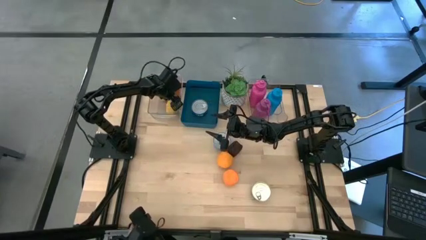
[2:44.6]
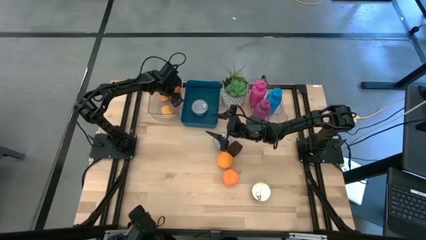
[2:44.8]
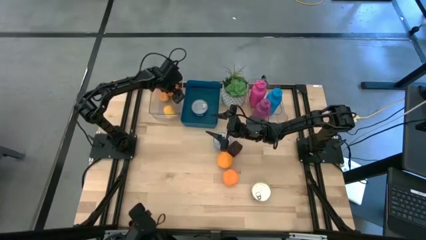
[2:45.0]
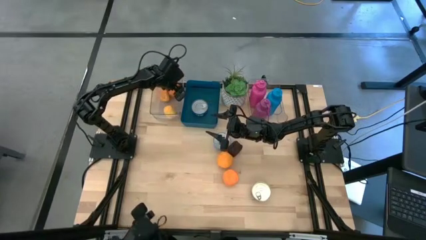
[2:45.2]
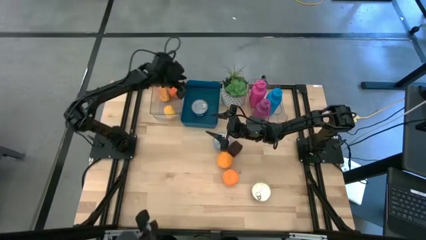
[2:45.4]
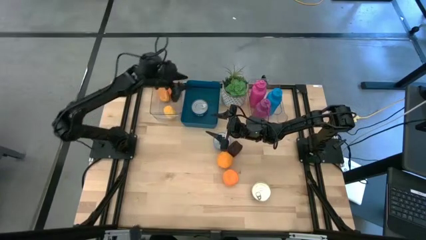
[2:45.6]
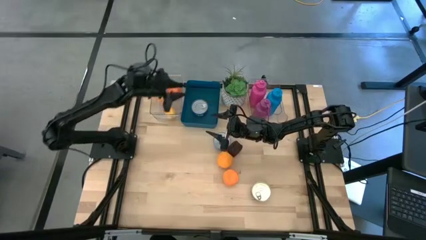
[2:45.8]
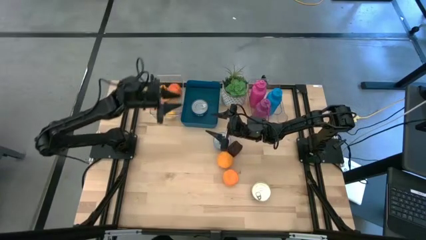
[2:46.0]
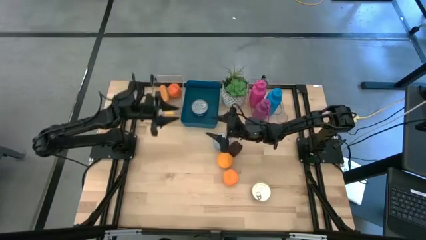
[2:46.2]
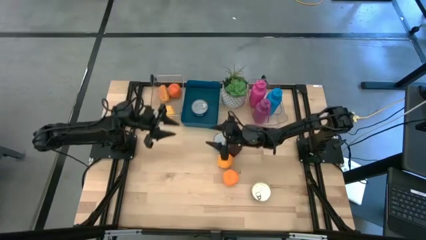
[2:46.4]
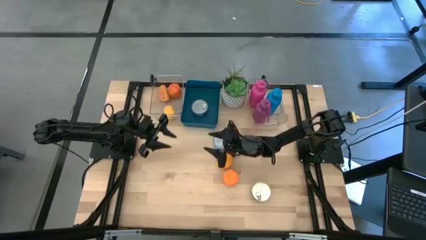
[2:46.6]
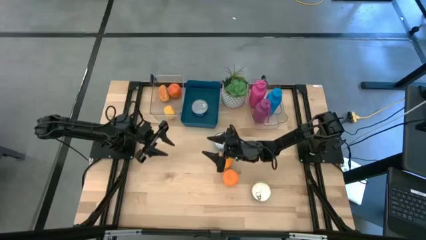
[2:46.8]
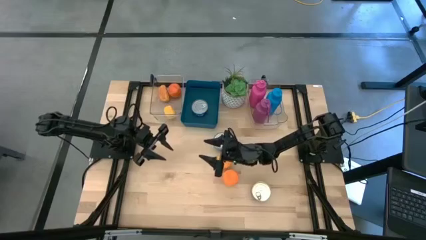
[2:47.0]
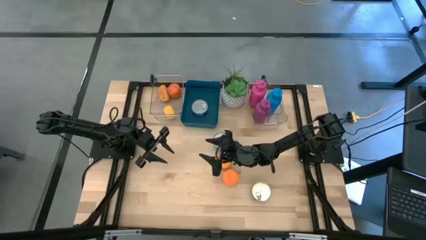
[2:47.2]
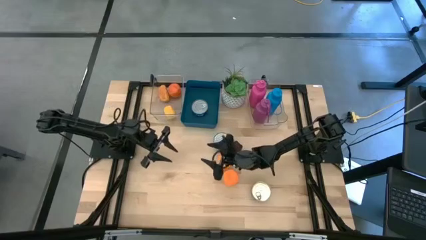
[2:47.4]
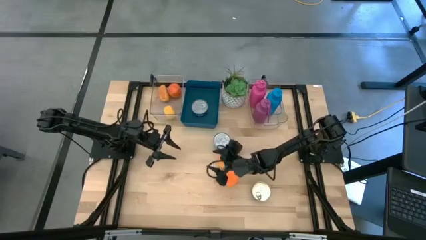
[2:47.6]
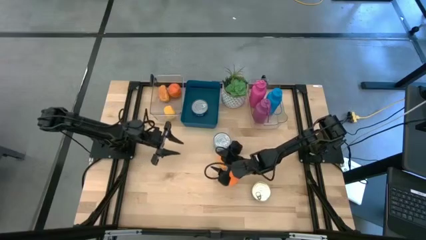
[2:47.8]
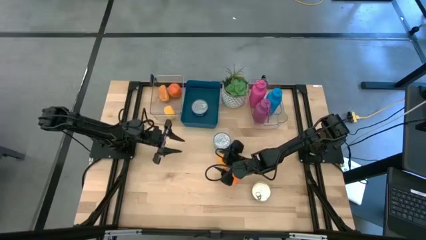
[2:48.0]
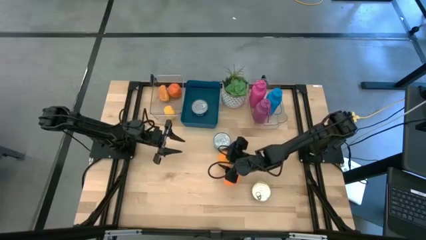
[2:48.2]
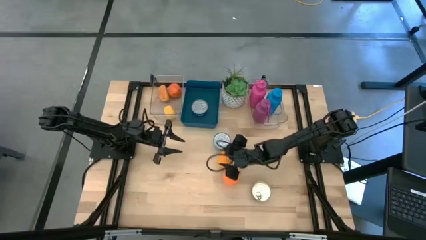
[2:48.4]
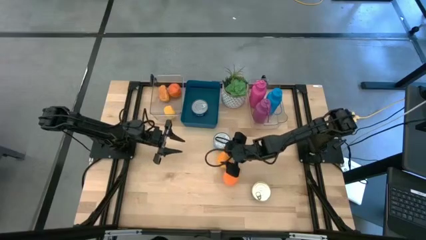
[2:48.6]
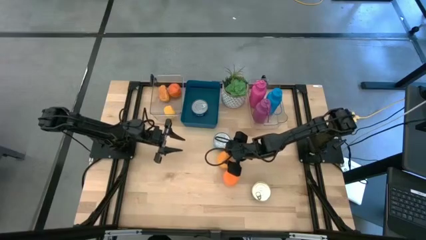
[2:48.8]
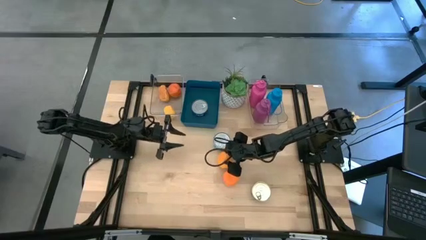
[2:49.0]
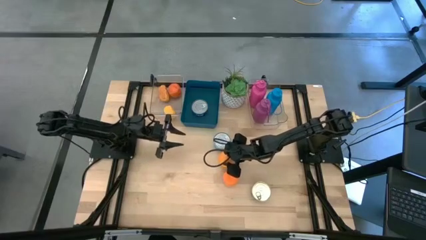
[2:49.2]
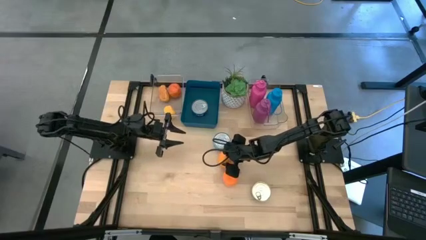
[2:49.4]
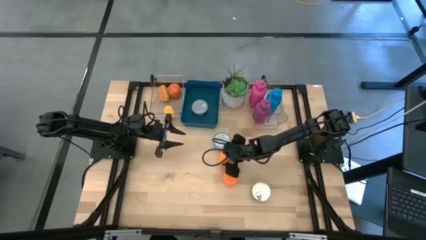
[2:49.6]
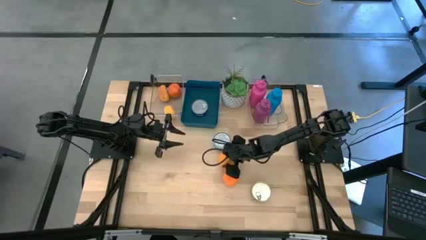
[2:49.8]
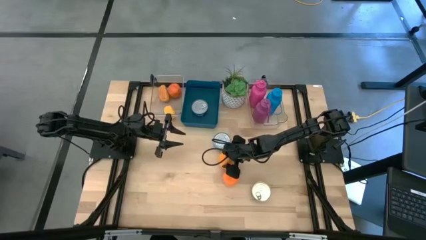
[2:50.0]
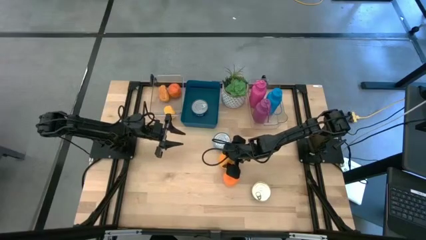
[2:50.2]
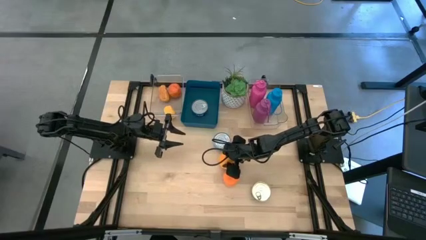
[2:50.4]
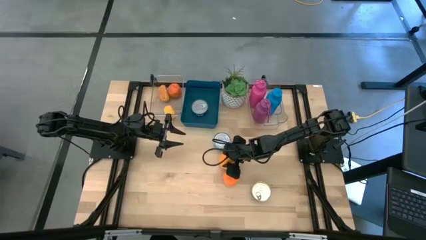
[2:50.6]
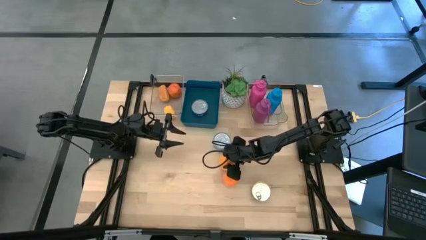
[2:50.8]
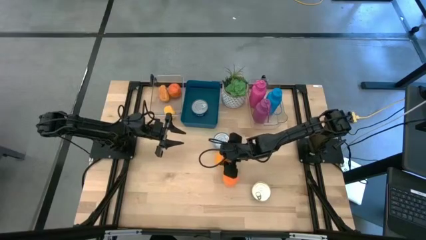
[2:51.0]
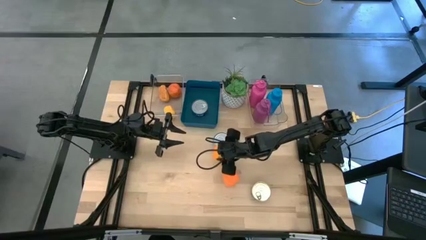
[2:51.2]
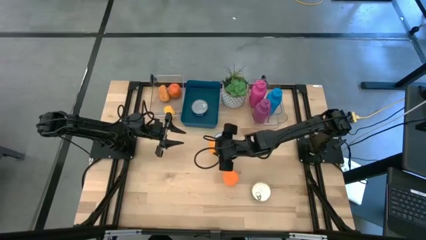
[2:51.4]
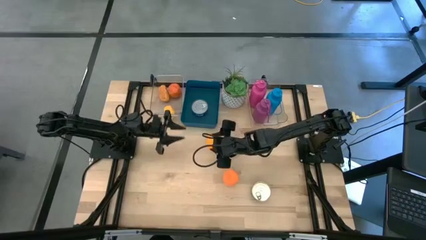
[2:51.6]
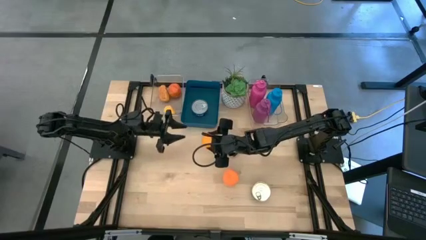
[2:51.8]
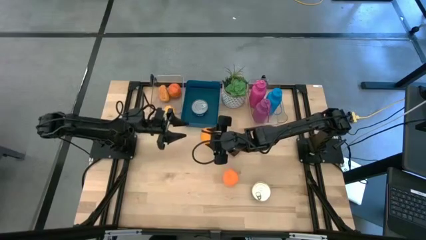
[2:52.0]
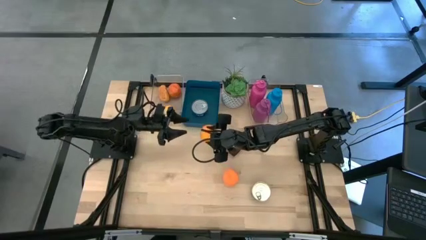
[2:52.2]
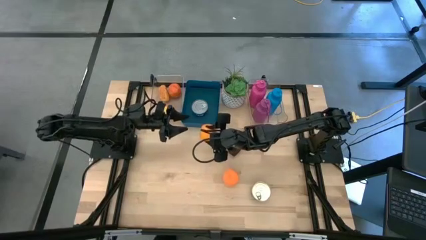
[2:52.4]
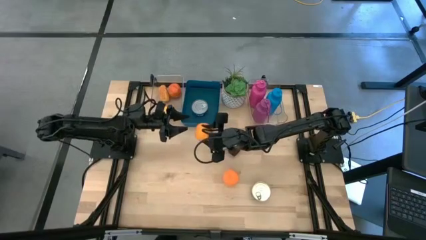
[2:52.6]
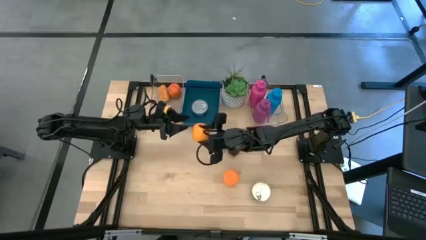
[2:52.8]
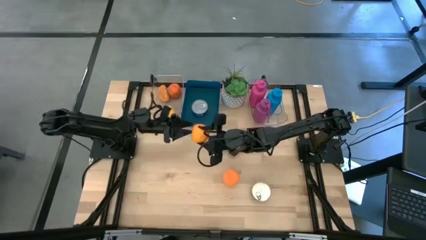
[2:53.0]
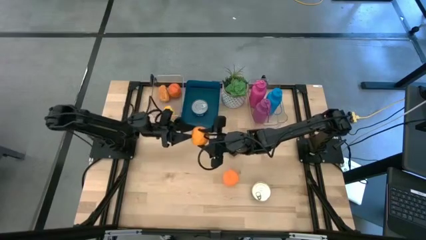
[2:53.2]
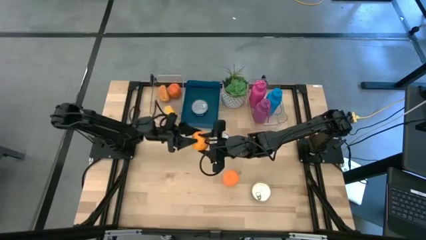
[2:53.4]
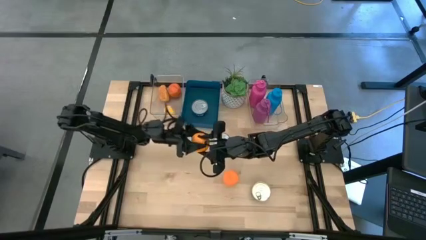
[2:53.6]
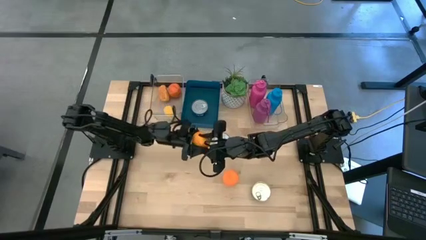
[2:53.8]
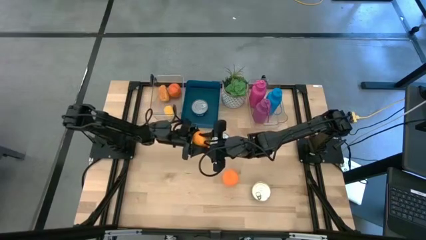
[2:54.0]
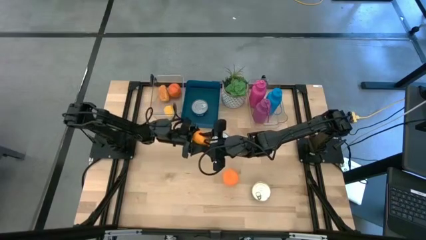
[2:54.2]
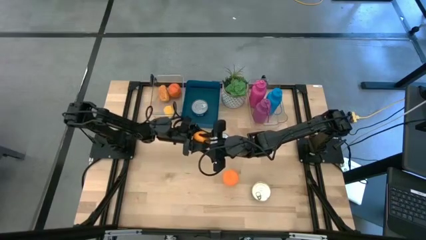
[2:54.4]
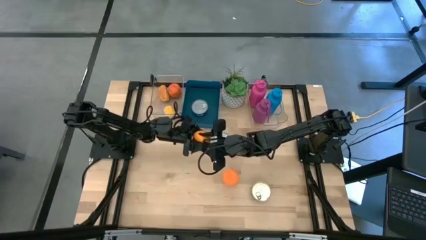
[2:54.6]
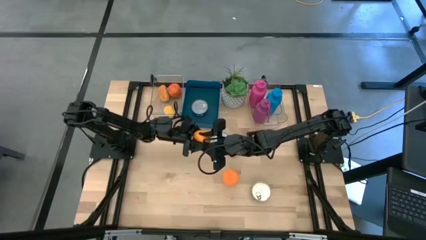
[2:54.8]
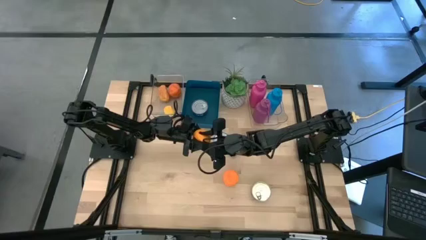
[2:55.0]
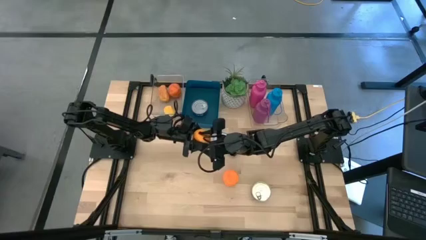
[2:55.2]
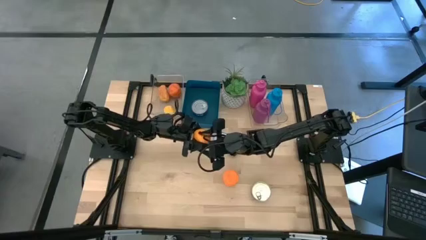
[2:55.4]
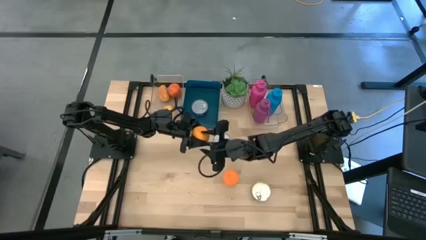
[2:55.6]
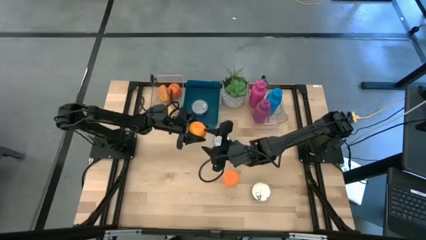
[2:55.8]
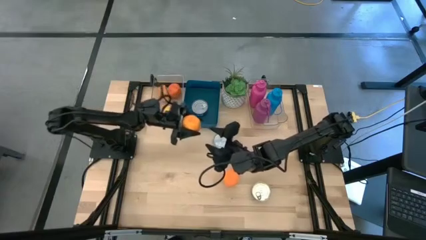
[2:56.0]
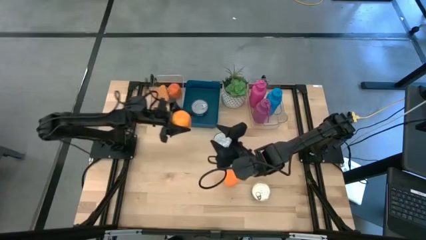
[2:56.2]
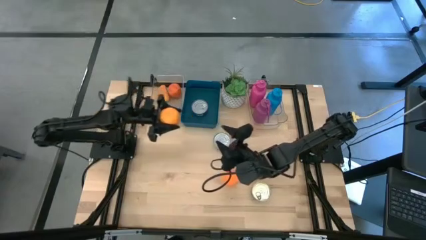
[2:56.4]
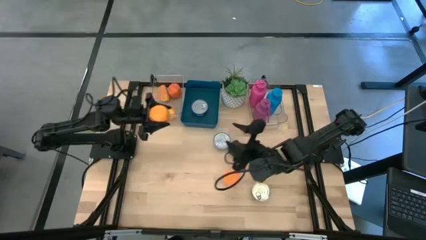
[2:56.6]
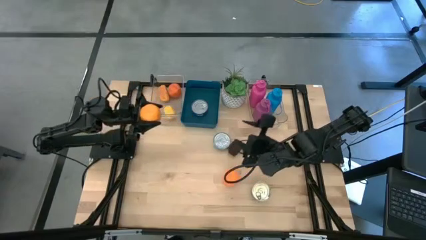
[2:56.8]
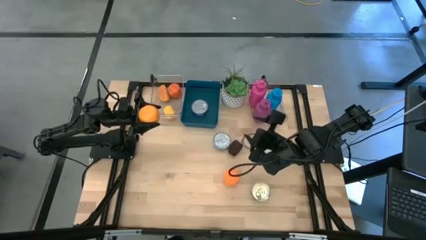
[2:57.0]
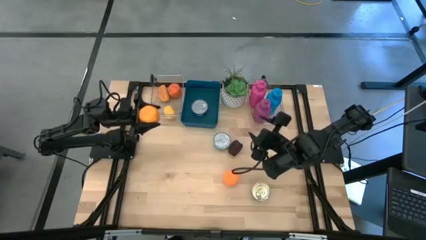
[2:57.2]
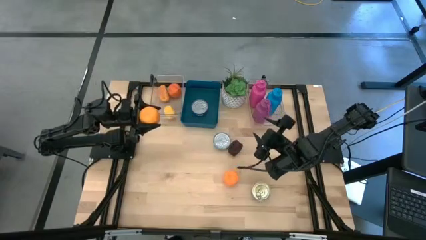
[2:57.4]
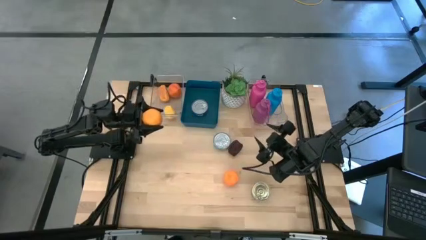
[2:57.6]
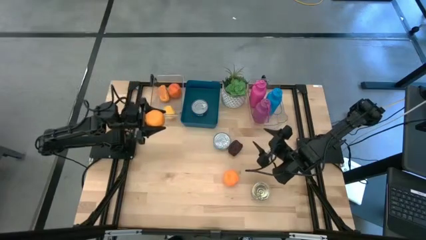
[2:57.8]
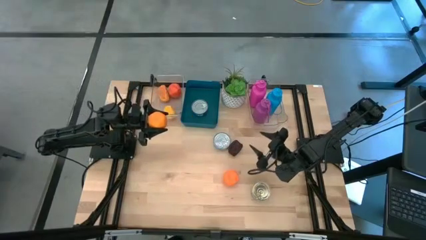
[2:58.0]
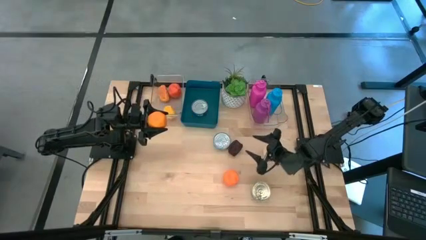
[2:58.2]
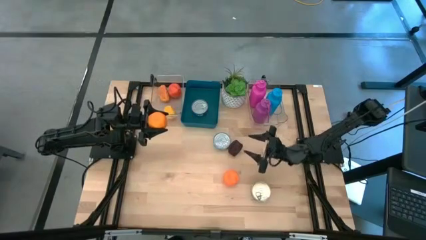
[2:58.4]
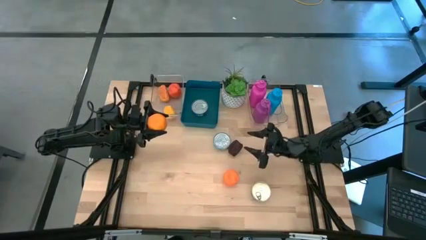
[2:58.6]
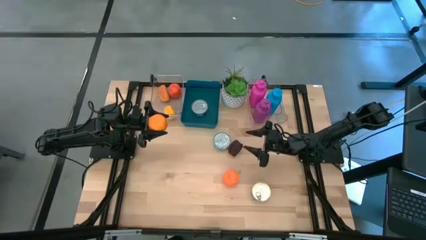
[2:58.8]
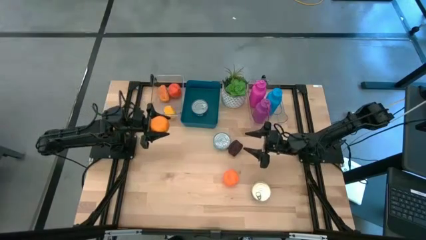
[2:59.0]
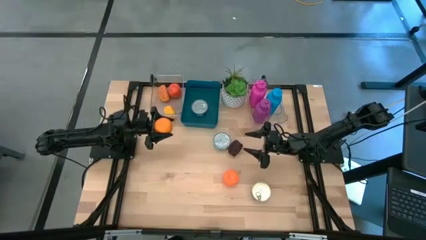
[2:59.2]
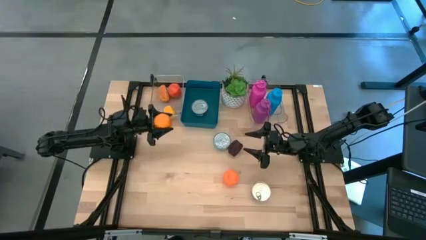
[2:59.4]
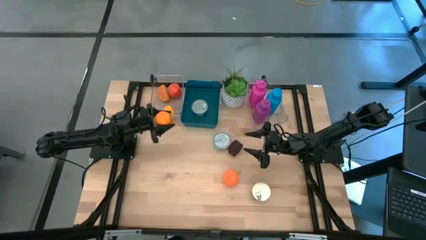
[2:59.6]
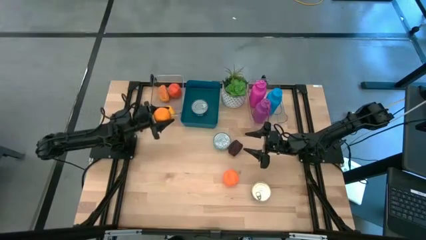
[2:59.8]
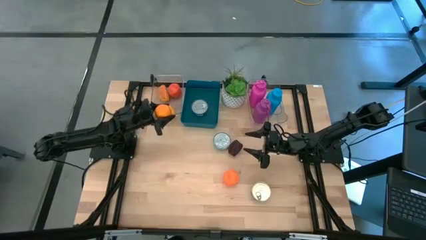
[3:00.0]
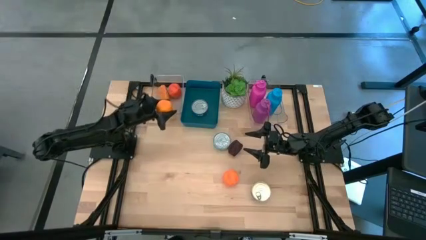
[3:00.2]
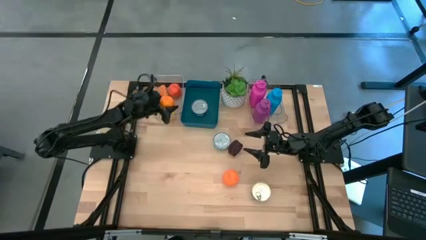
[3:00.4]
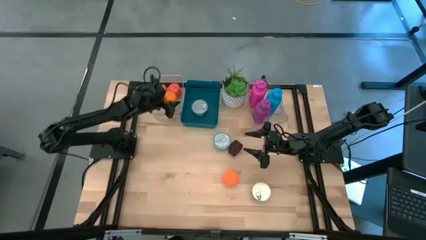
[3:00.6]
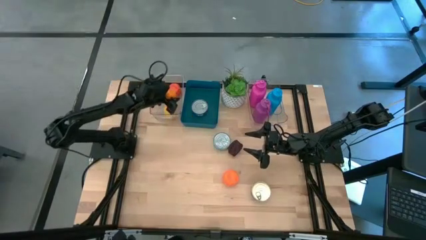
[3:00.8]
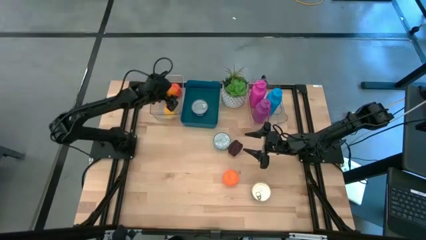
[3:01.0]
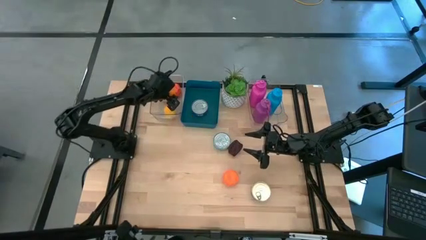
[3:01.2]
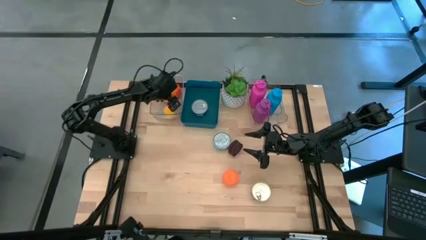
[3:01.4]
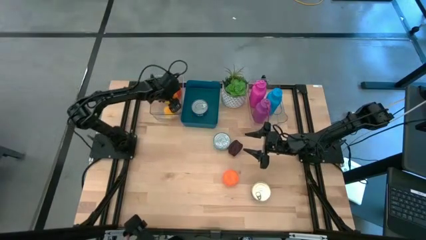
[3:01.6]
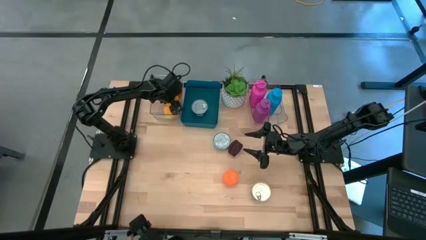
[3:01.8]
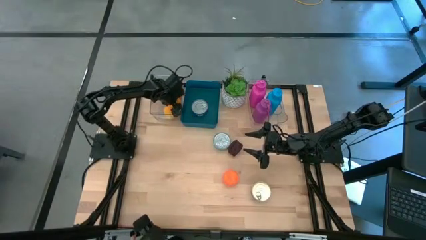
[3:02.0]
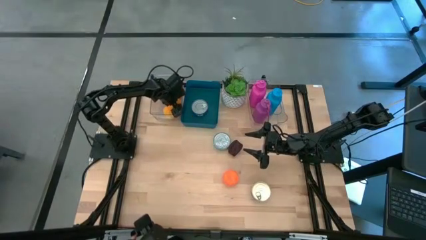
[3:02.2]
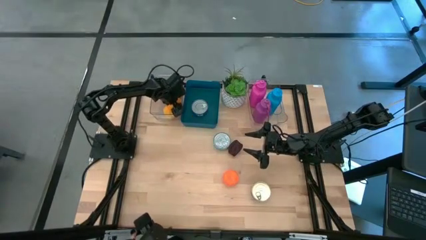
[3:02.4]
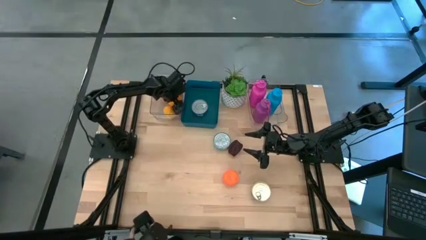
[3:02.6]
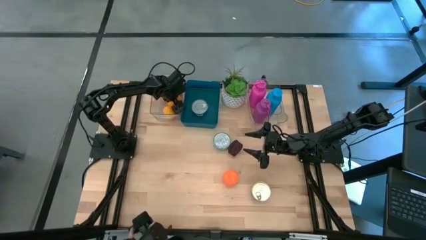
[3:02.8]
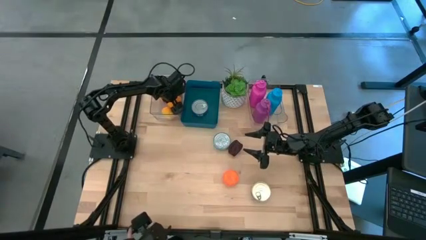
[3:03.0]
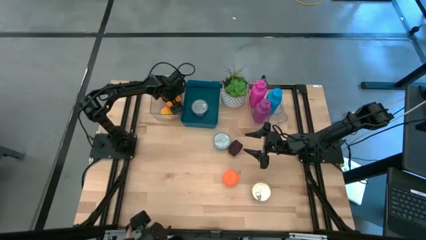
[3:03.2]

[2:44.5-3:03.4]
Task: Pick & Place Food Item
Put the orange into the left transparent bin
